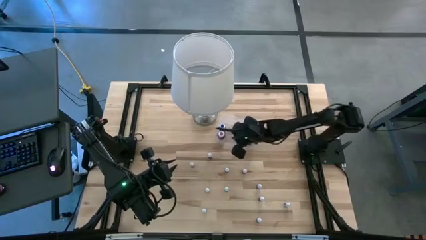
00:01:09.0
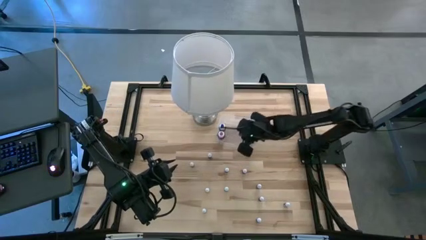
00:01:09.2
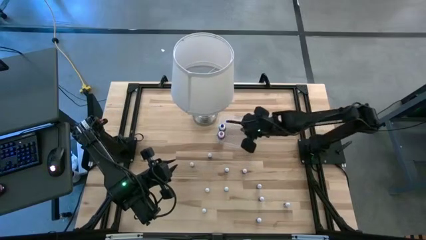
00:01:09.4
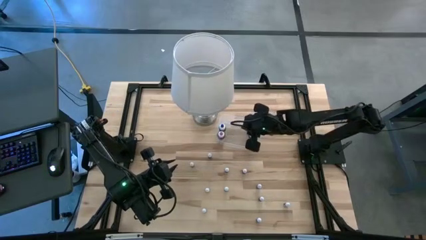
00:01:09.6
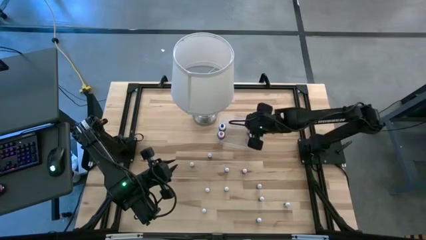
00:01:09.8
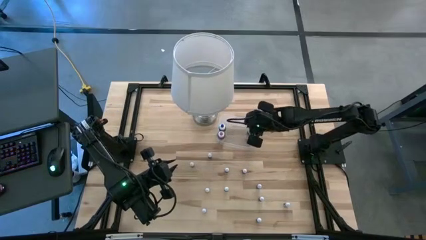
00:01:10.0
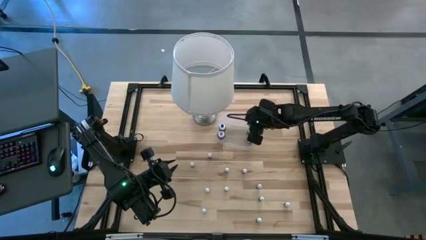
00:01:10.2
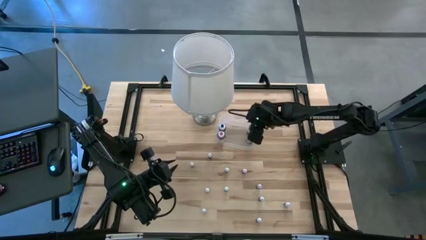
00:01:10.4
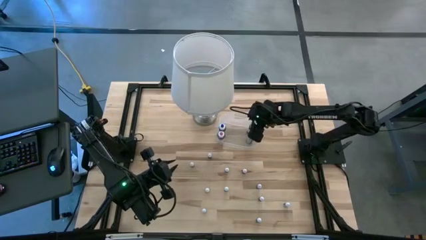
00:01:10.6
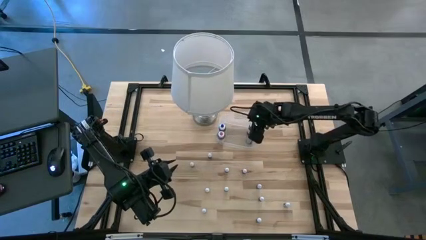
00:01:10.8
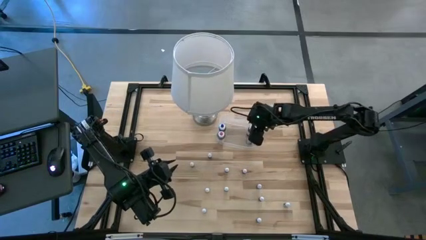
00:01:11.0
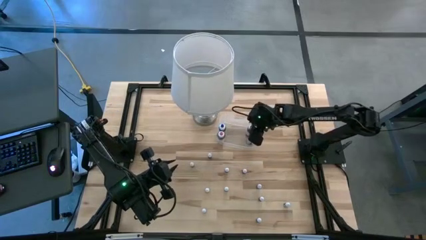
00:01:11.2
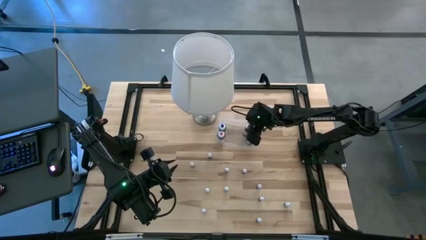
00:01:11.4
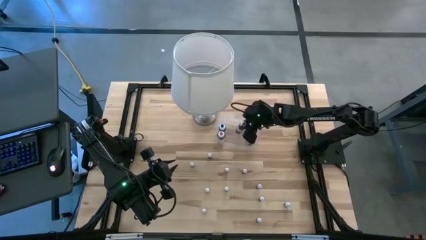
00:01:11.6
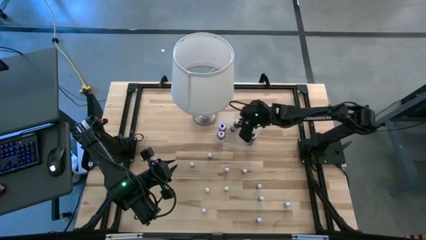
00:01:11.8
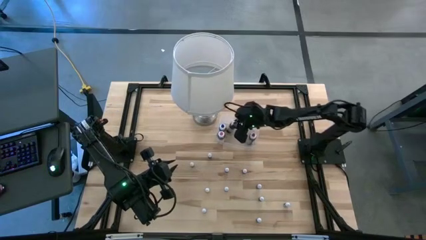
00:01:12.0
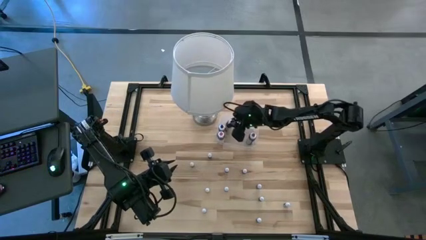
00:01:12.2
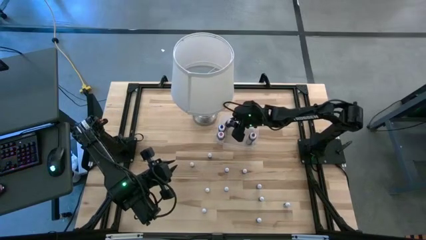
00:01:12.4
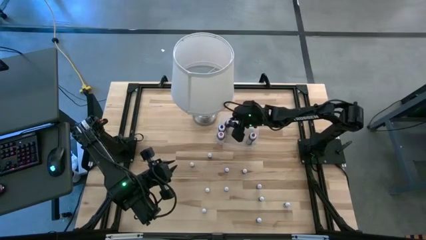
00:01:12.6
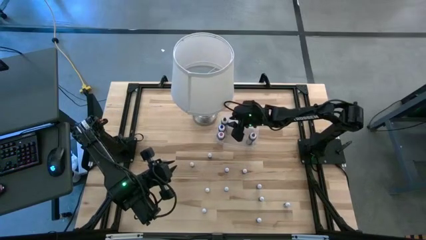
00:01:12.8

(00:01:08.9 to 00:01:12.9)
Task: Pick & Place food coloring
Adjust the large black food coloring bottle on the transparent bin

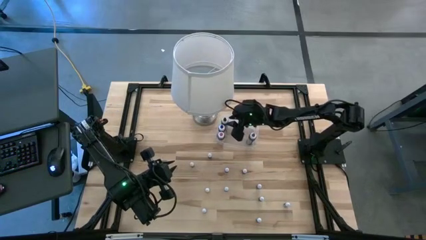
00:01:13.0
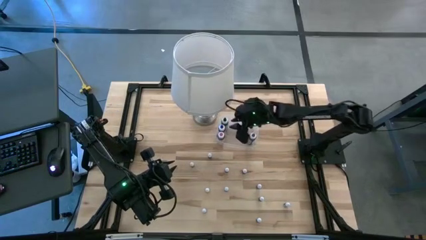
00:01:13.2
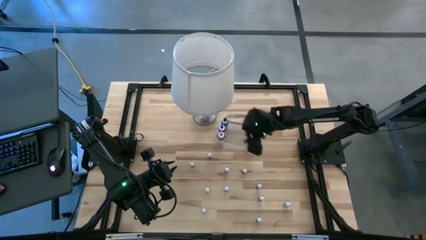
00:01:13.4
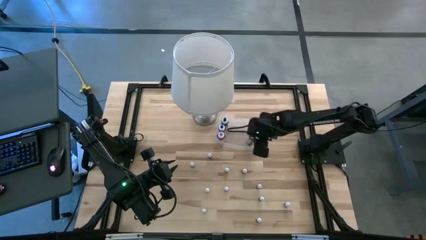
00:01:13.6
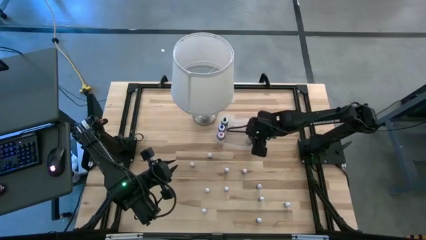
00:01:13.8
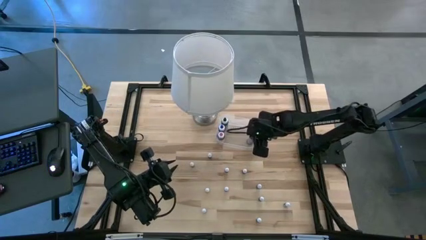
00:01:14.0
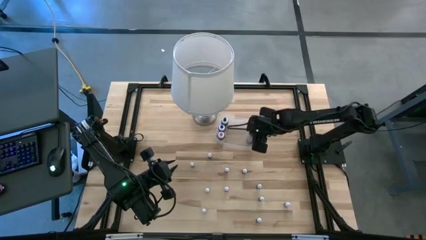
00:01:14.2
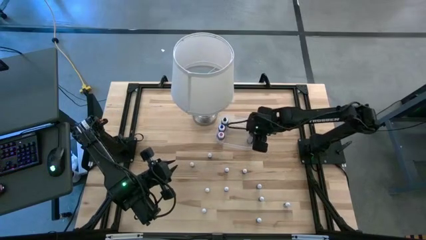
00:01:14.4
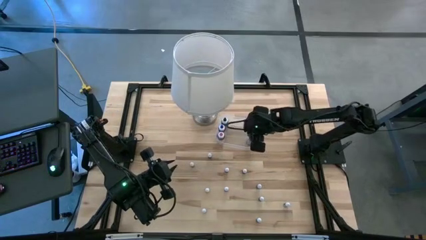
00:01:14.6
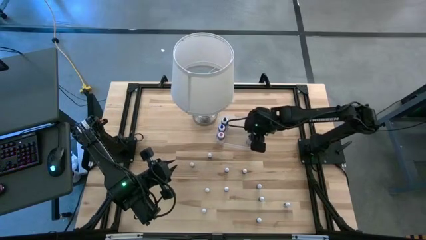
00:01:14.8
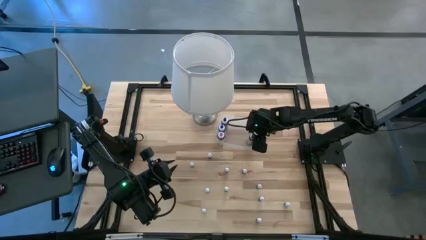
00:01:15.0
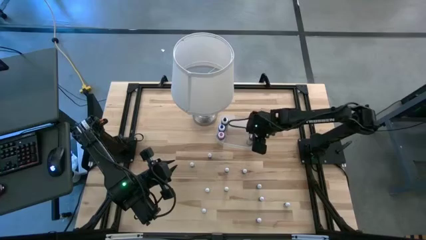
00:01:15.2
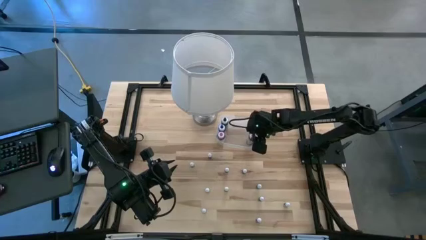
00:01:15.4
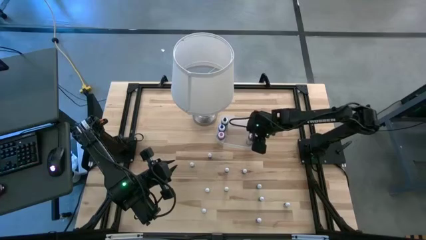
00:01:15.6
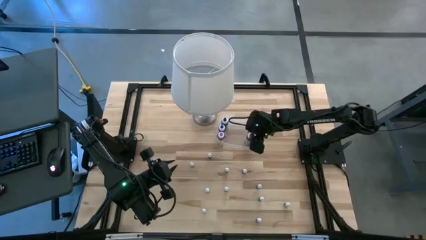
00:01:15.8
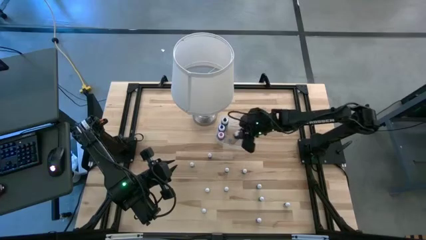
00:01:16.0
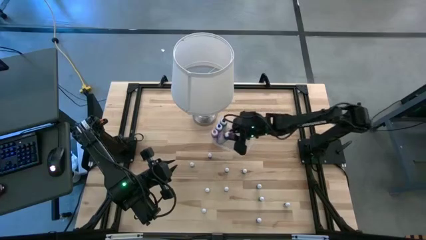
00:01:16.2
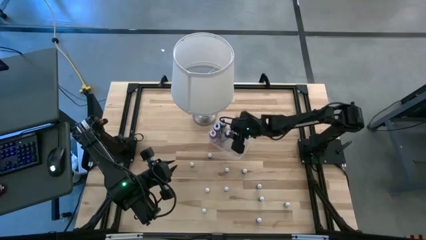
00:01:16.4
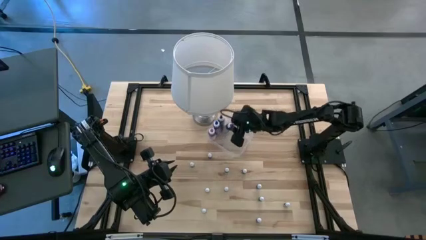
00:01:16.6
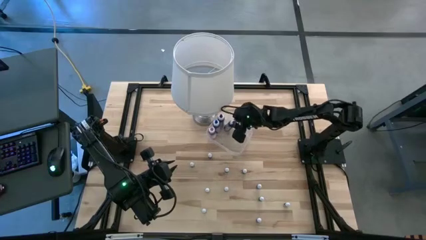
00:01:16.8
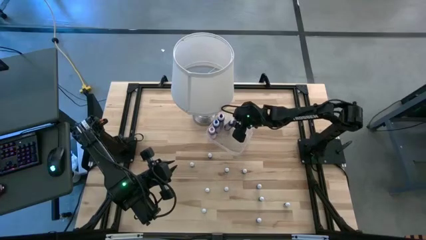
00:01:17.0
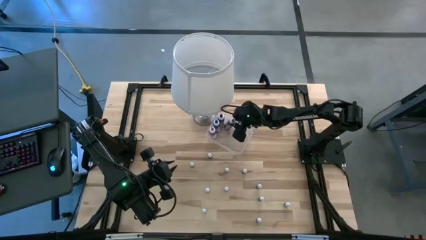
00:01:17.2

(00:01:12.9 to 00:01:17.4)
Adjust the large violet food coloring bottle on the transparent bin

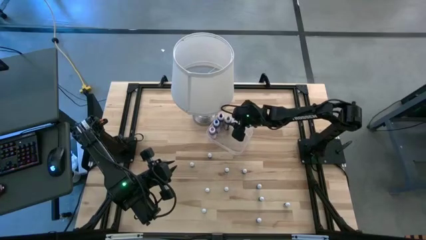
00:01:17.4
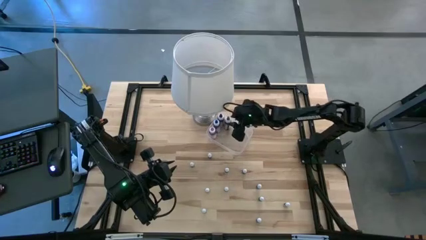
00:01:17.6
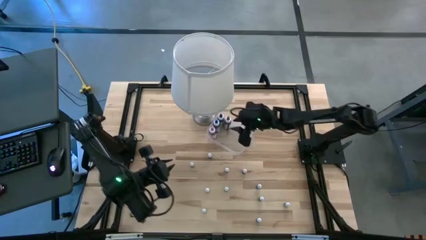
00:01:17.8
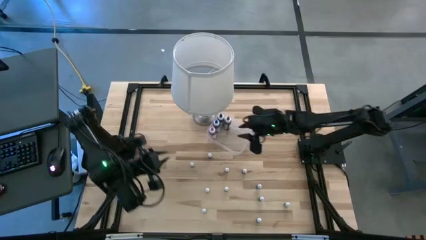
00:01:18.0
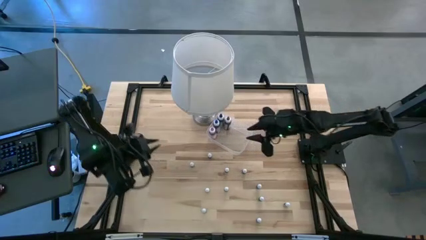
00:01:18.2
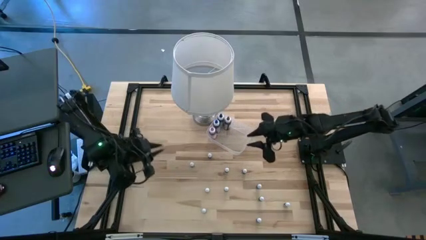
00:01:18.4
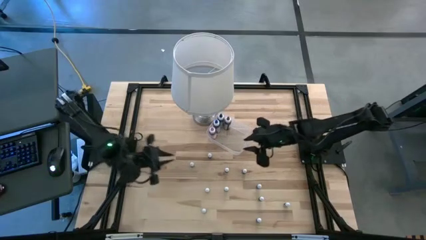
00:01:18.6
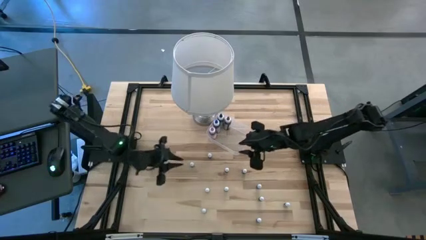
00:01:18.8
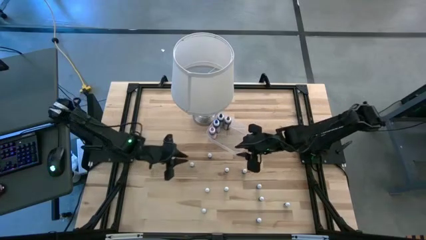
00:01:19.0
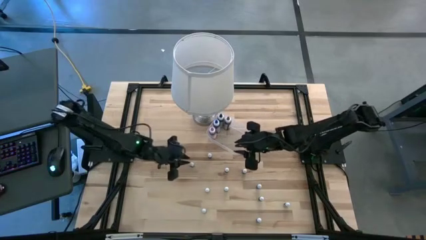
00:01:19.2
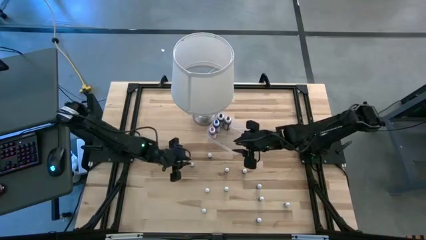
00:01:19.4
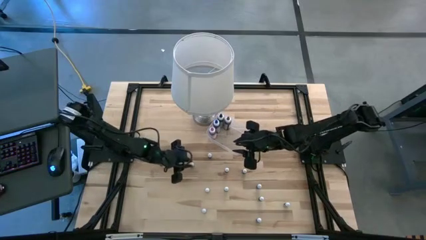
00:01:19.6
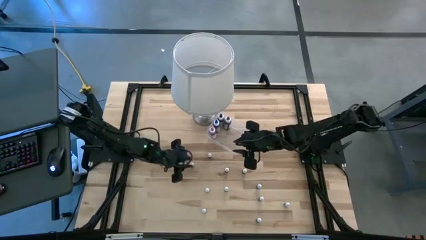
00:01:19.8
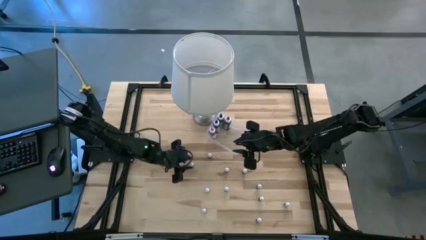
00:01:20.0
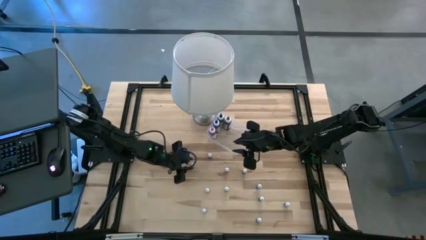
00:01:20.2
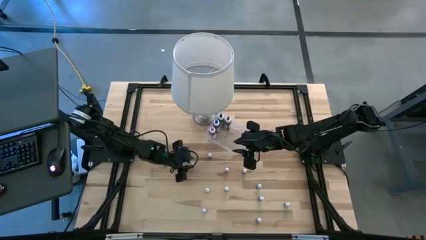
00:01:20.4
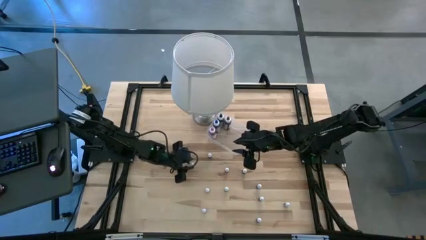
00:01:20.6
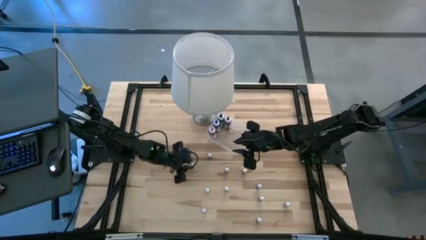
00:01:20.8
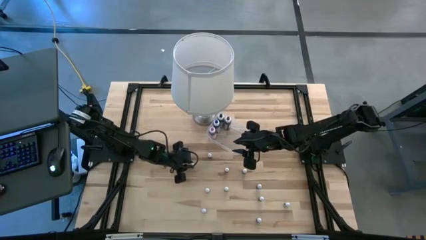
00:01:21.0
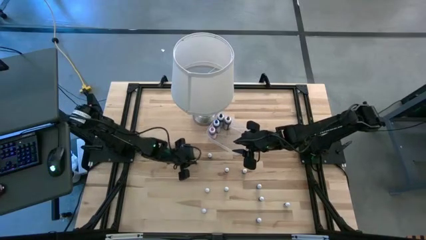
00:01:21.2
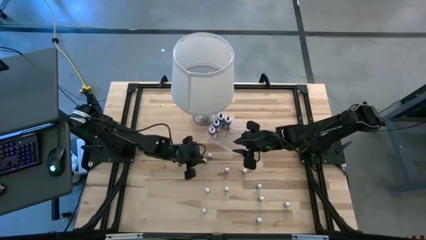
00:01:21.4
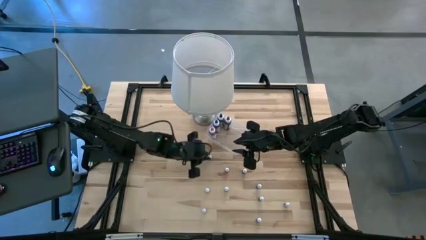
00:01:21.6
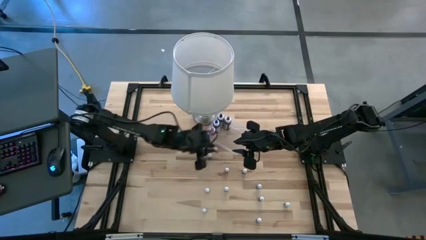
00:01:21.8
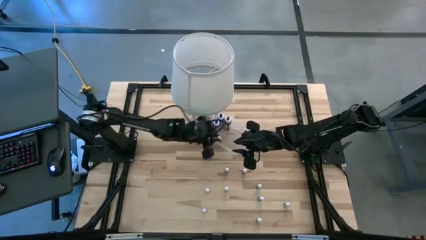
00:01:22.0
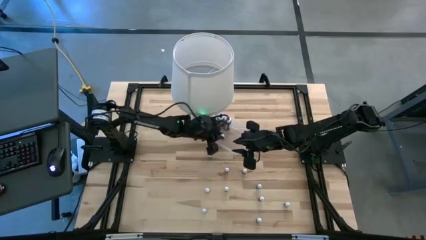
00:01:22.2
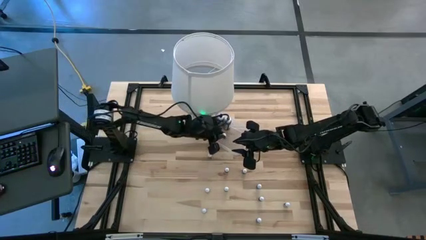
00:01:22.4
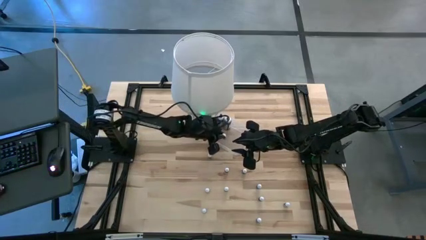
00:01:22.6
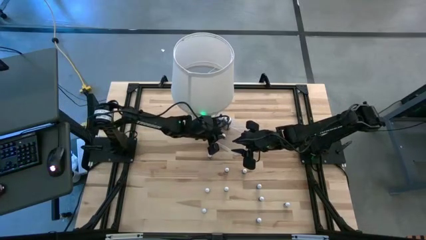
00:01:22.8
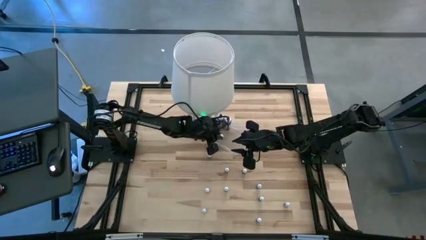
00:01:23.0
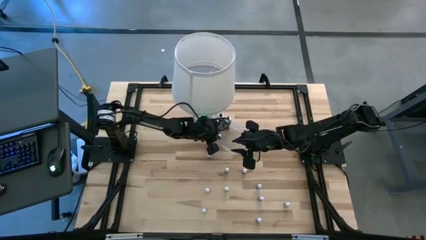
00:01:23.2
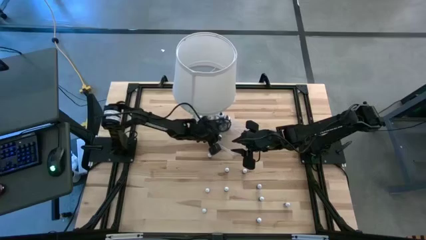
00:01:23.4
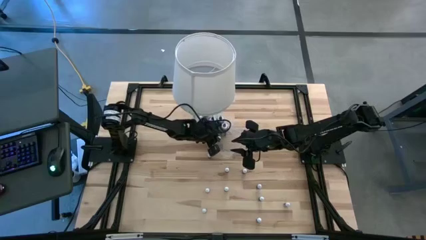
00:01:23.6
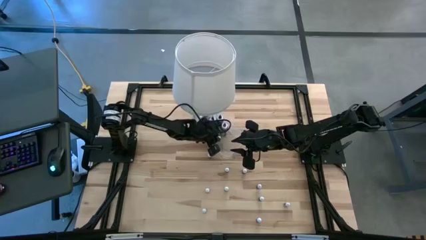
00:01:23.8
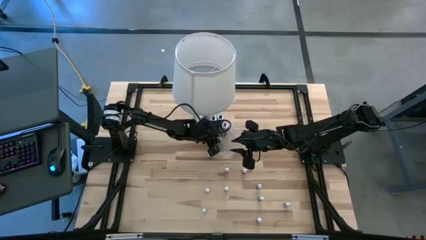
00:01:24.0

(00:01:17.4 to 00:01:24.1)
Put the top small green food coloring bottle into the transparent bin
